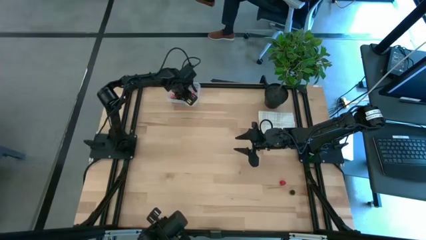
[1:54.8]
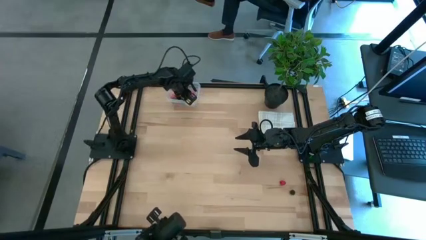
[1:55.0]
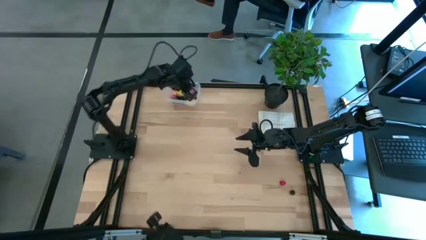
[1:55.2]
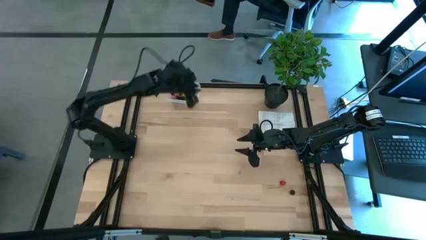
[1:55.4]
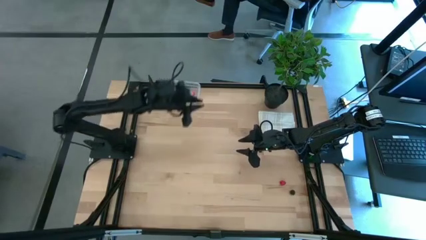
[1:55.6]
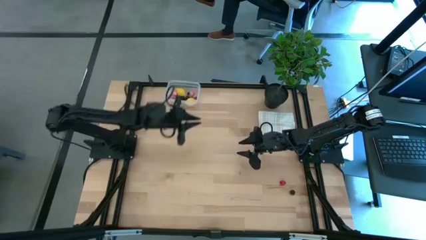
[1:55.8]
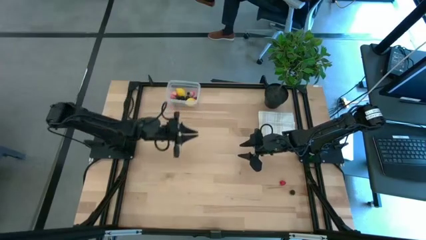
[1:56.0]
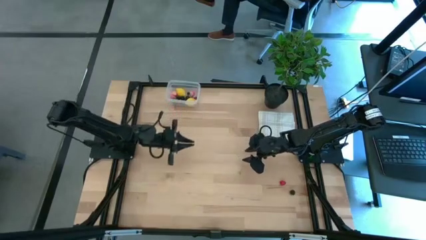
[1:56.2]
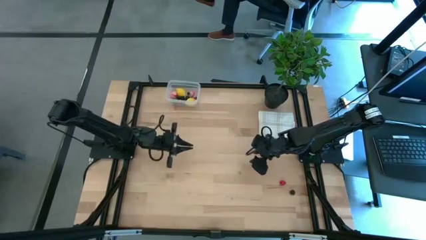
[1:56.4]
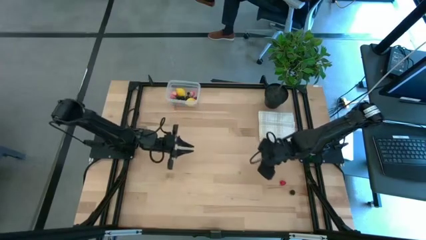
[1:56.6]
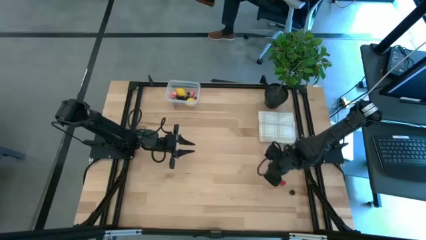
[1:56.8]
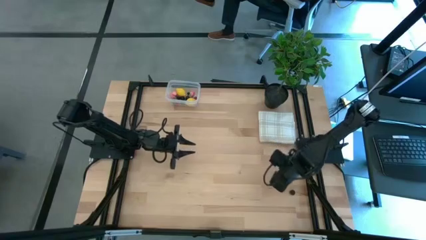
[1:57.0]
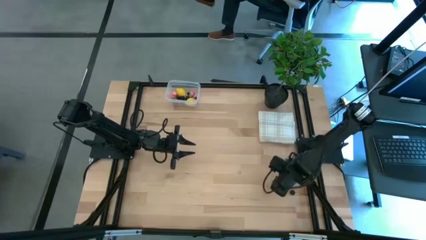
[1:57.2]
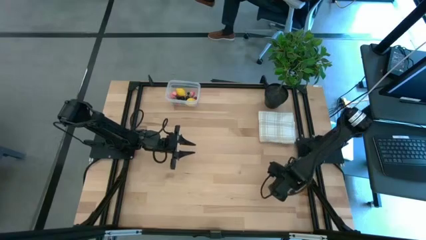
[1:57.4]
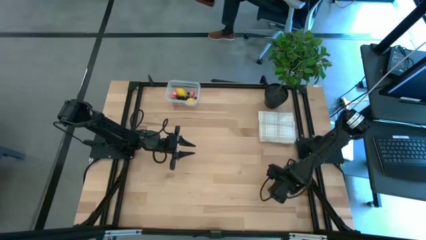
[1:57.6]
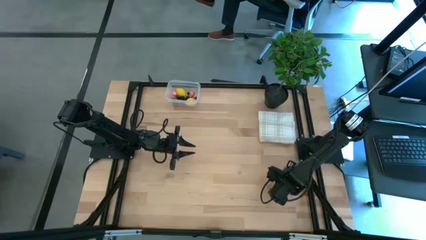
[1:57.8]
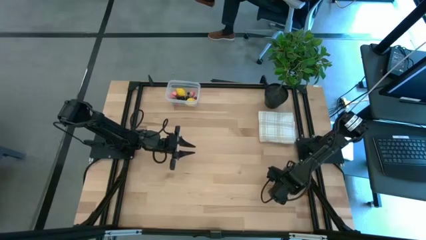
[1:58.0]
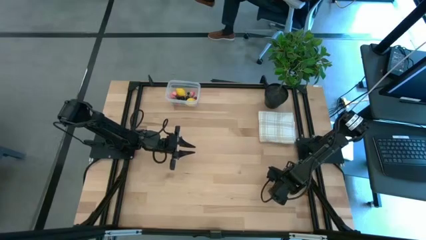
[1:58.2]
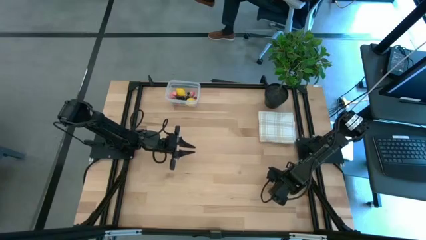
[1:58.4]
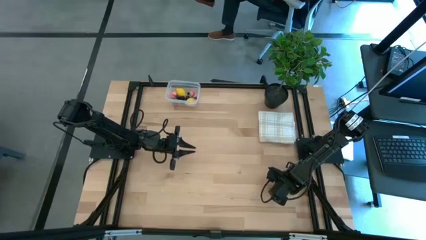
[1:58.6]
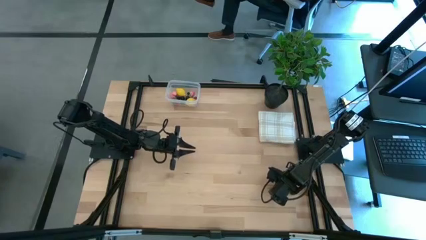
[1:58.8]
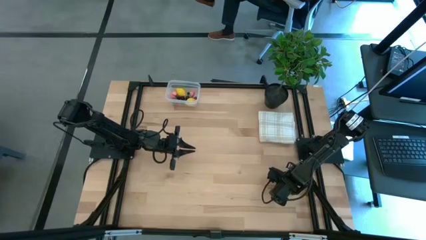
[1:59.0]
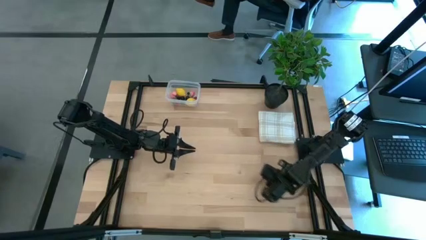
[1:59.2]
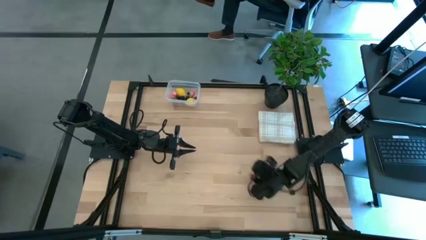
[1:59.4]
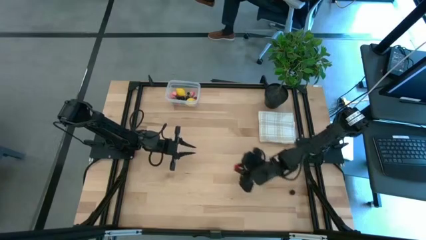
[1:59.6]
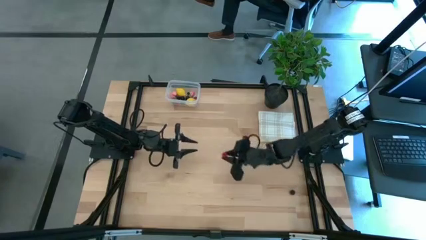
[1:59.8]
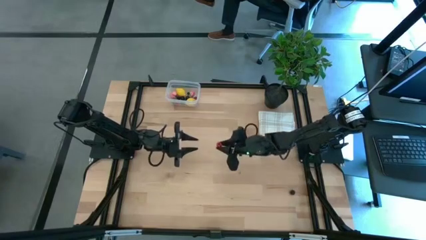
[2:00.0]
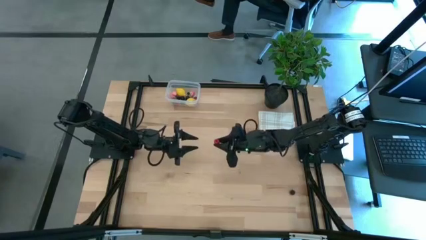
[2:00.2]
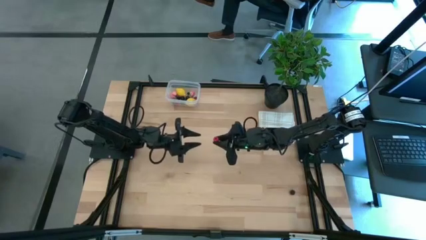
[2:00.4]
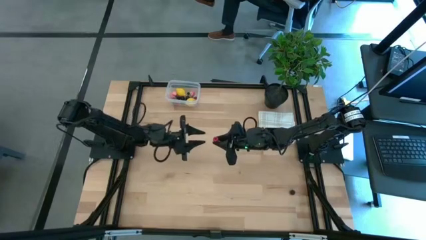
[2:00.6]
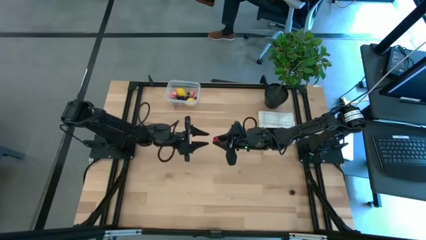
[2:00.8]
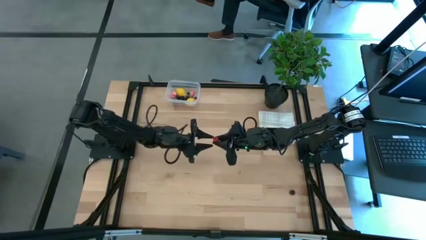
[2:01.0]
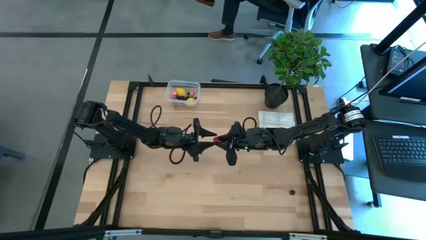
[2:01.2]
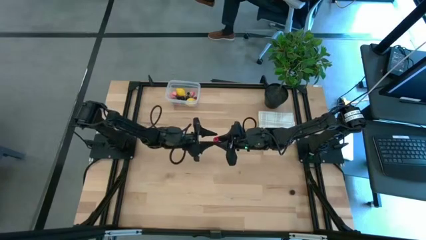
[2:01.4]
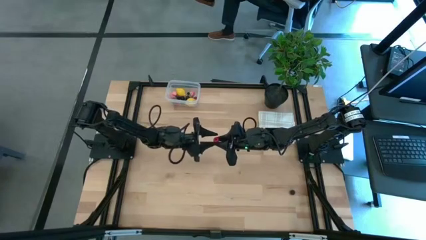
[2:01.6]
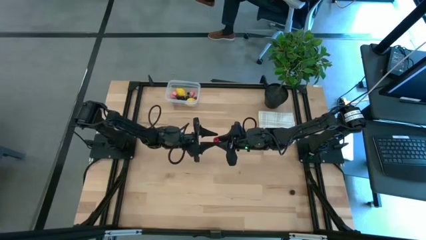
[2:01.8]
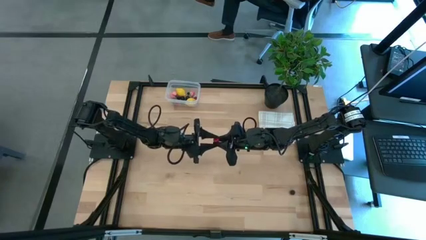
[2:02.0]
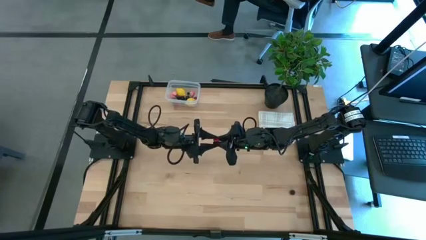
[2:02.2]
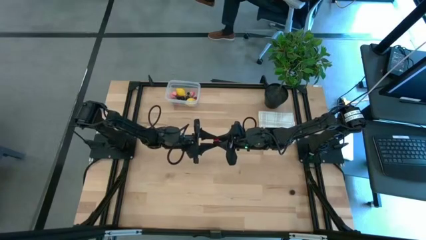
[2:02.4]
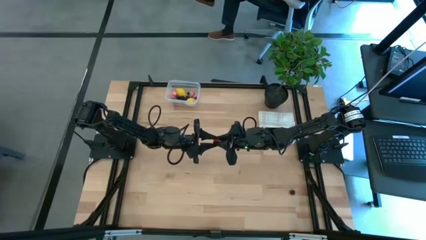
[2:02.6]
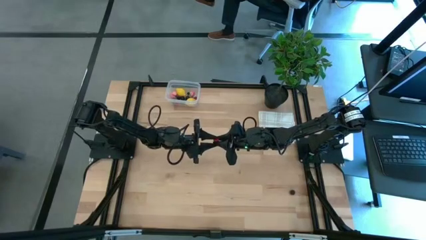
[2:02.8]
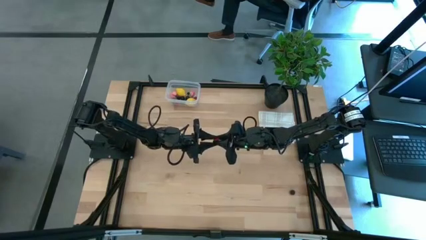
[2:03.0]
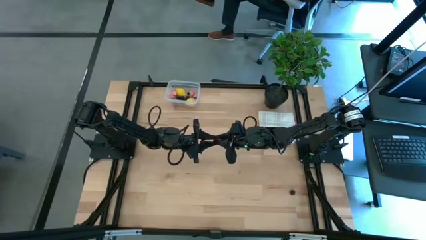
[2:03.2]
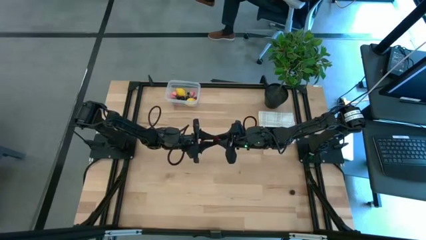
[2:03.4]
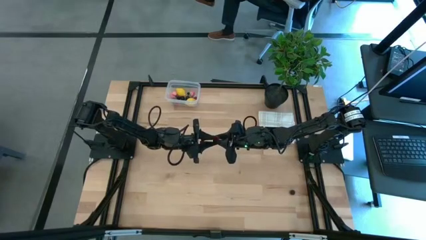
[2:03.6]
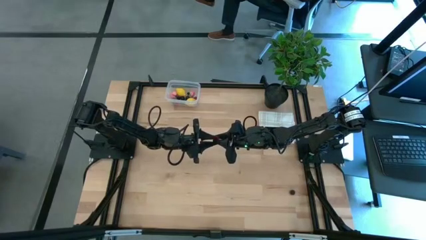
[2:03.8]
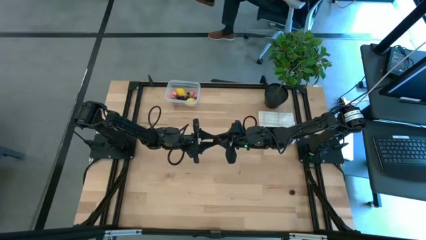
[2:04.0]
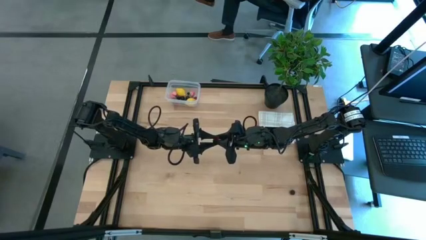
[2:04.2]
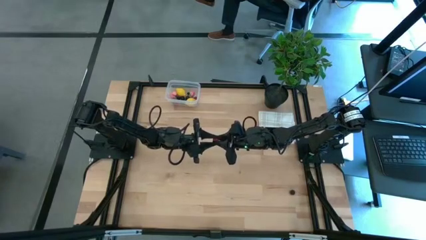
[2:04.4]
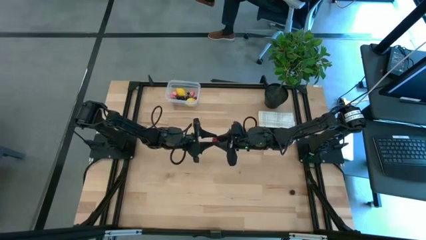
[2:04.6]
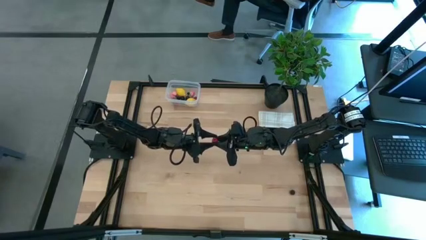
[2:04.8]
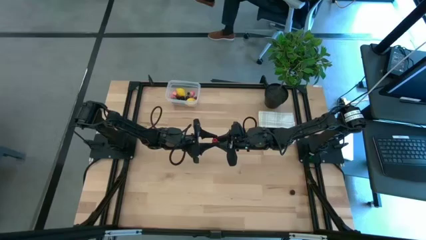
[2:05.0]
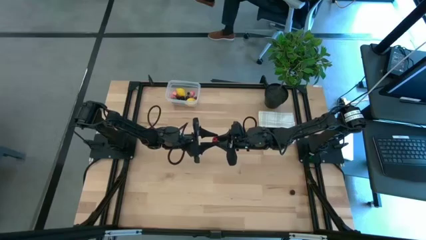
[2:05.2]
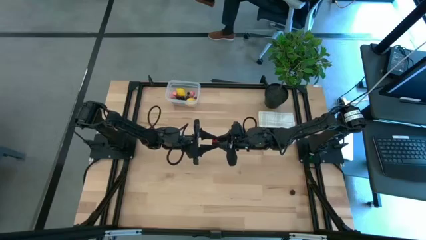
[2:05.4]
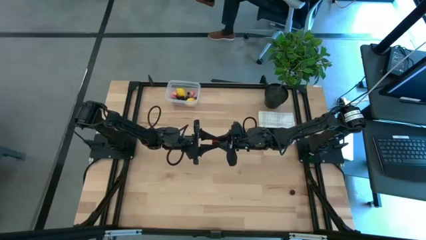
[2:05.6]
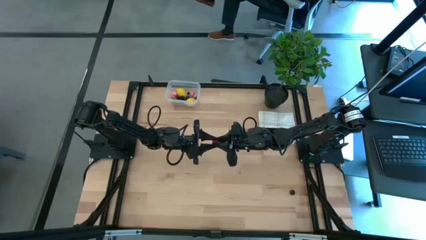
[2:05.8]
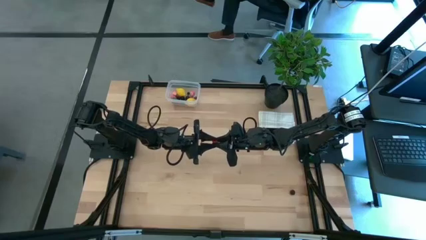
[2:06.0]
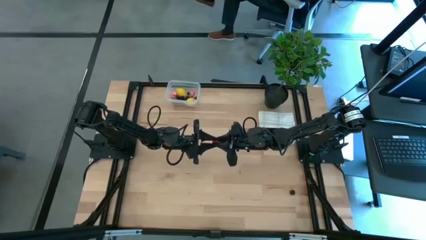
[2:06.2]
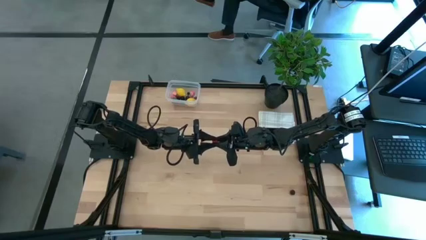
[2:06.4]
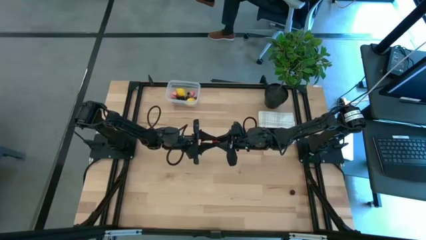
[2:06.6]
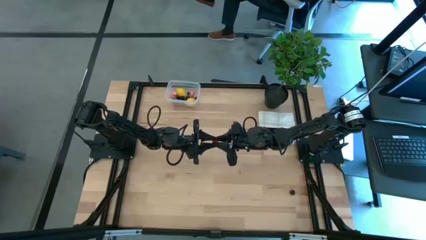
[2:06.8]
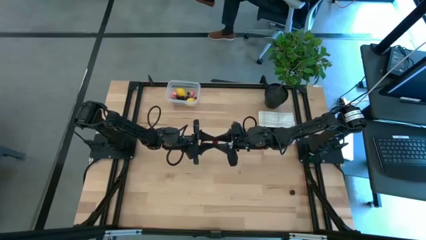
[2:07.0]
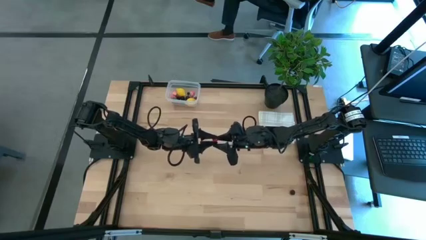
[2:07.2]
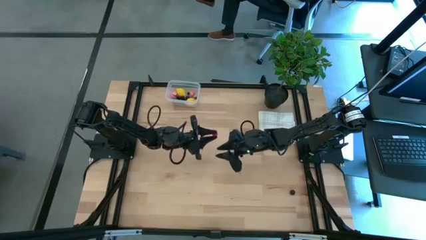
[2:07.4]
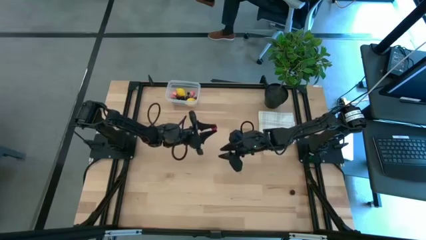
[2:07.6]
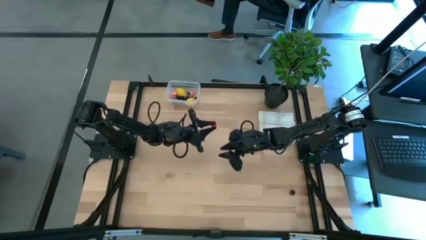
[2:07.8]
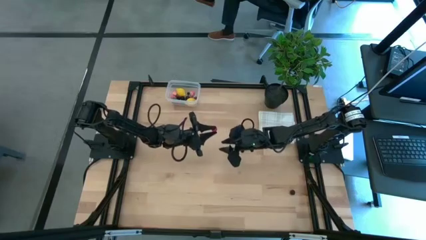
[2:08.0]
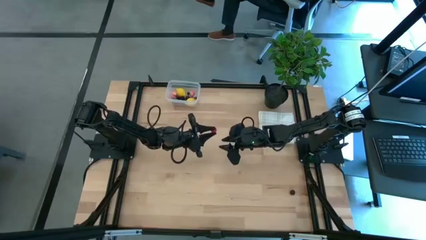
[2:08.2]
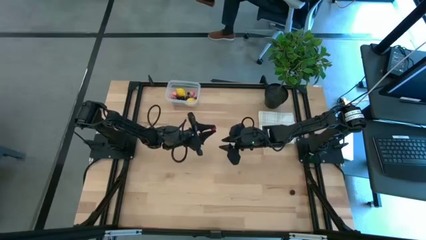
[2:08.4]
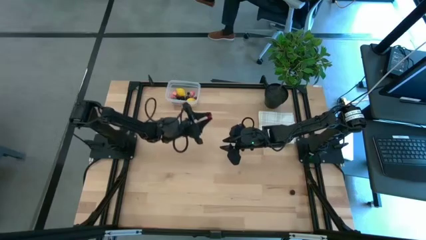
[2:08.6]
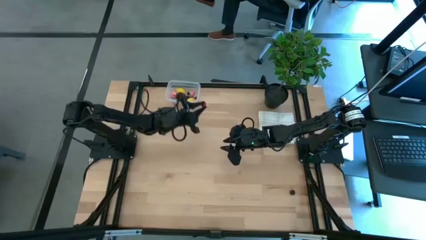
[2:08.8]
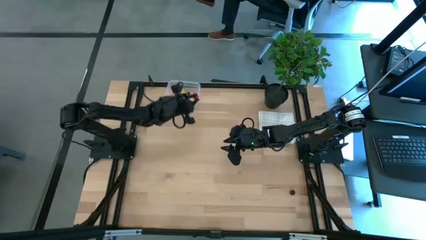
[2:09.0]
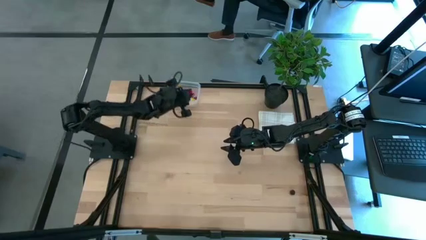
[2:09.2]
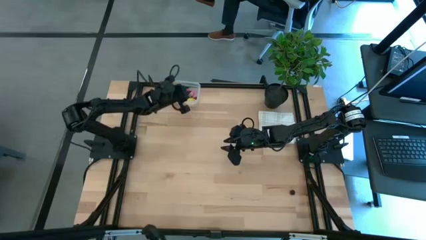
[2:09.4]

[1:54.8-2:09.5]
Task: Pick and placing Produce into tupperware
Put the red raspberry into the transparent bin

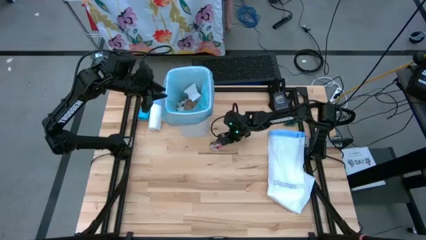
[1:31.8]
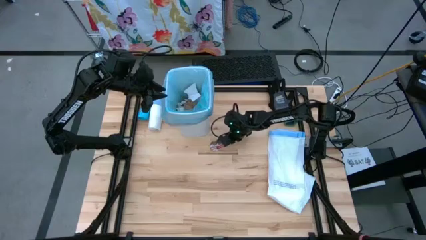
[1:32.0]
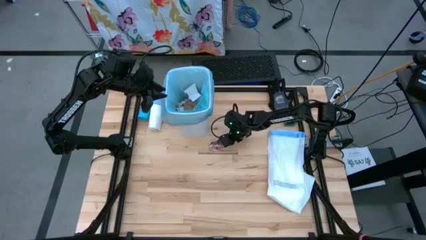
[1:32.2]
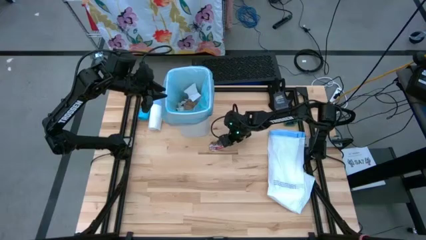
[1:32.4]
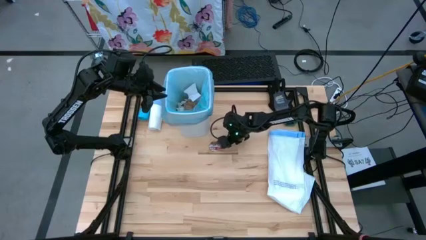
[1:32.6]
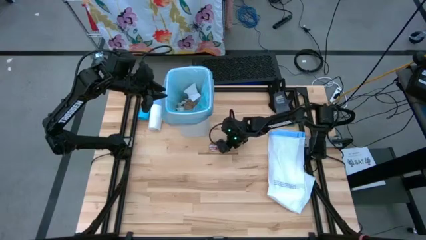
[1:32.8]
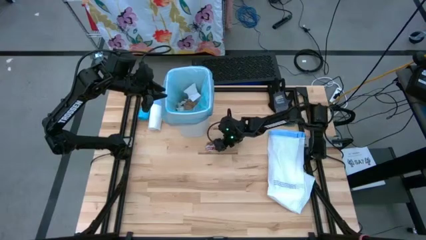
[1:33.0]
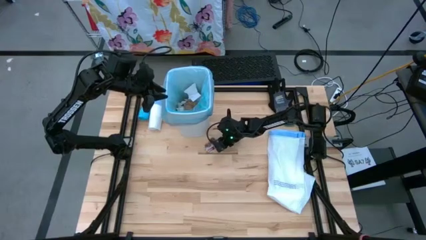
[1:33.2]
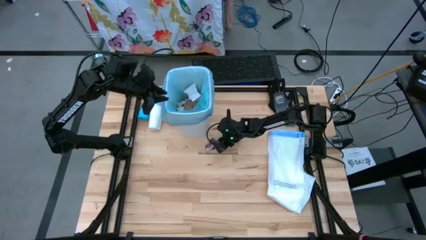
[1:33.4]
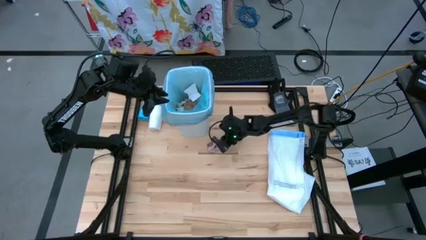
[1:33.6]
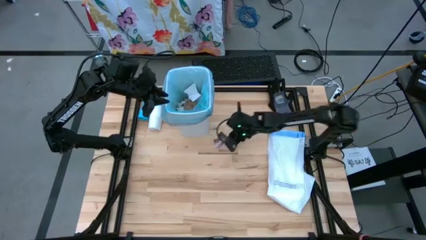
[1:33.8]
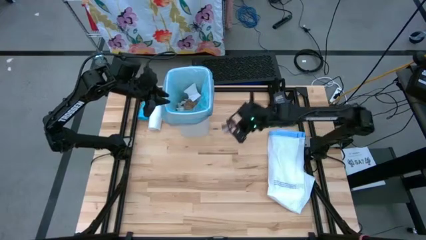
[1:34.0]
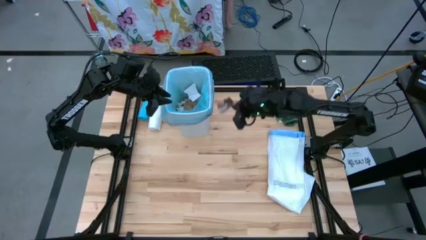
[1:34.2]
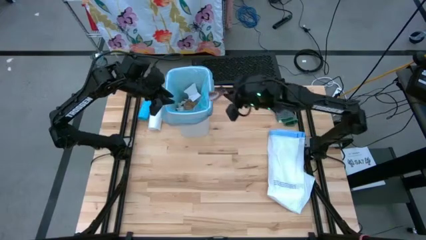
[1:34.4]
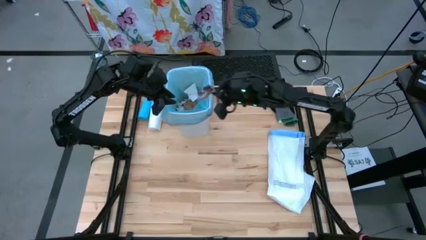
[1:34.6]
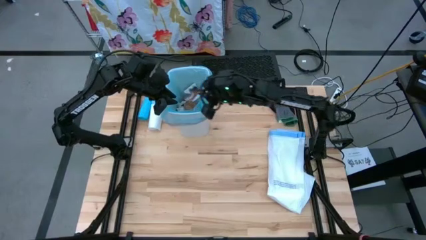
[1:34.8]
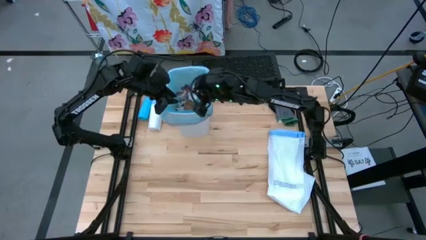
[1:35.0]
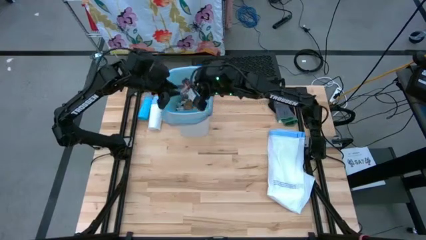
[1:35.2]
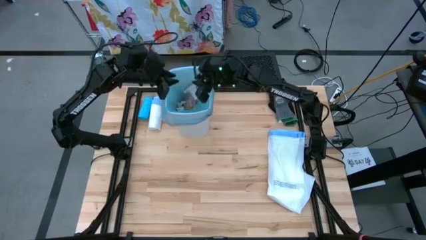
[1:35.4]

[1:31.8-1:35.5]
Task: place trash/remove bag and relplace
Put the black paper into the white trash bin
